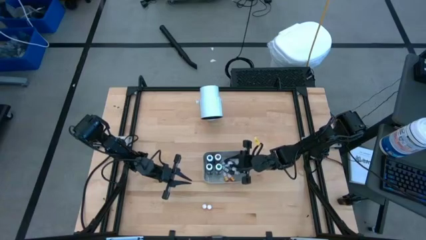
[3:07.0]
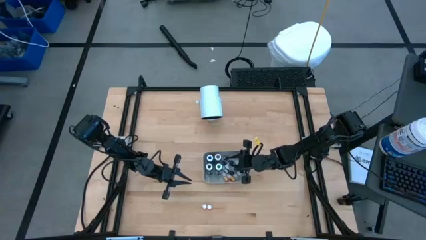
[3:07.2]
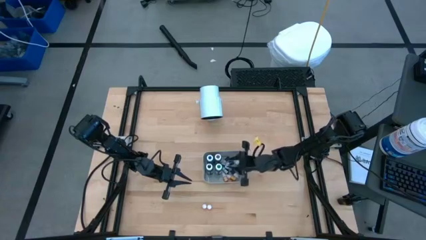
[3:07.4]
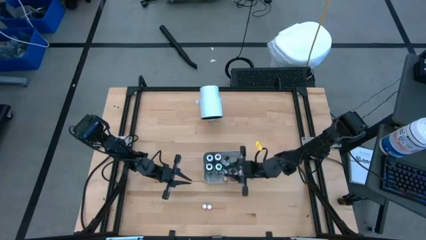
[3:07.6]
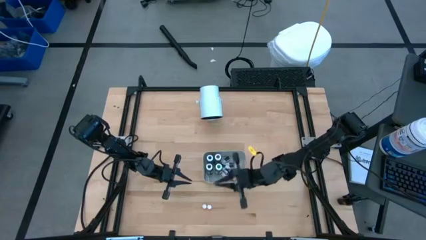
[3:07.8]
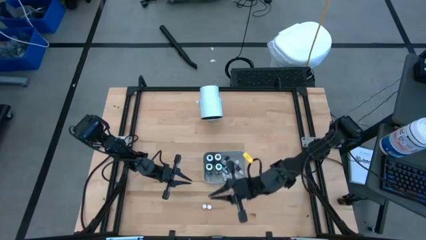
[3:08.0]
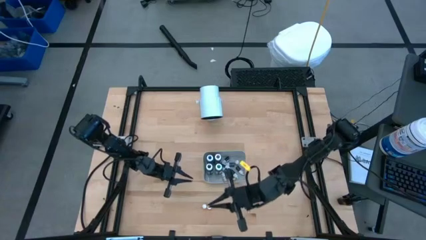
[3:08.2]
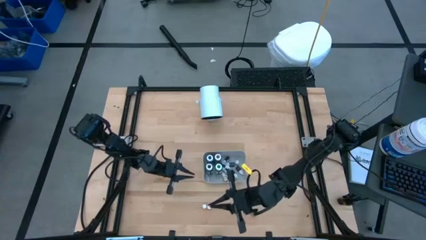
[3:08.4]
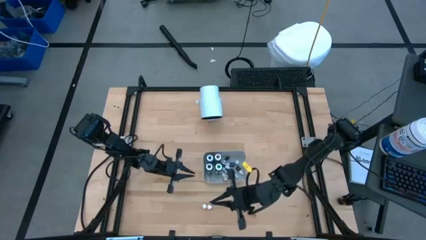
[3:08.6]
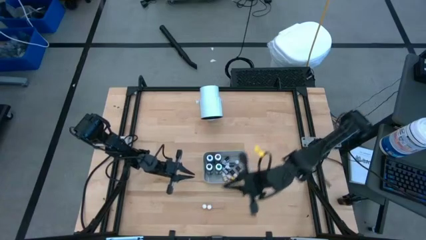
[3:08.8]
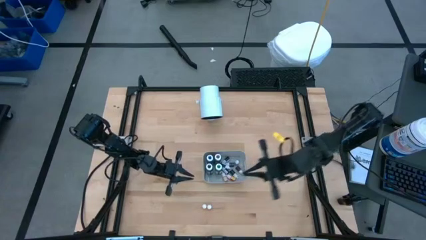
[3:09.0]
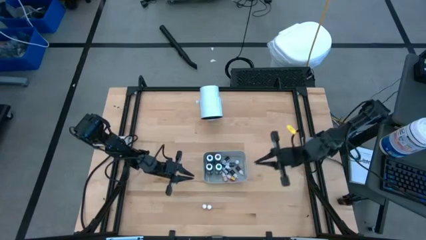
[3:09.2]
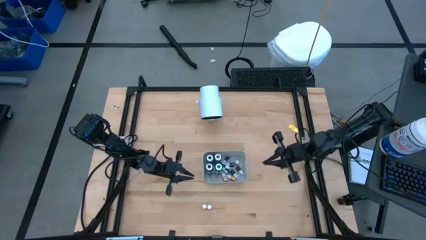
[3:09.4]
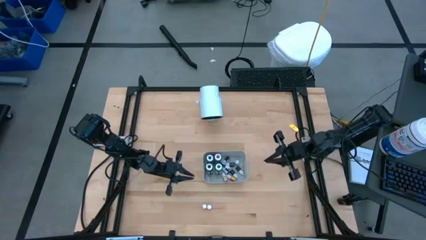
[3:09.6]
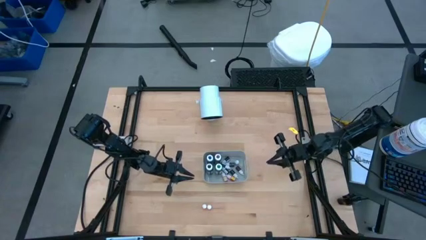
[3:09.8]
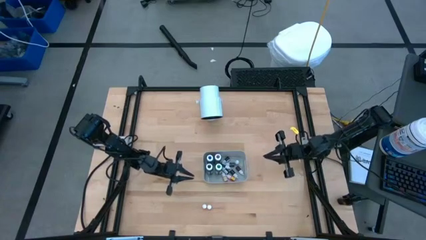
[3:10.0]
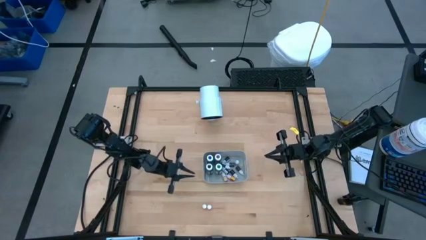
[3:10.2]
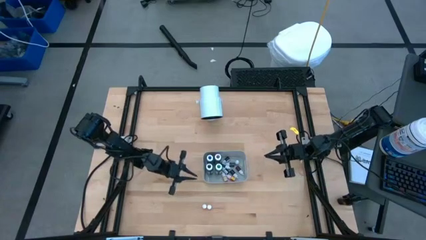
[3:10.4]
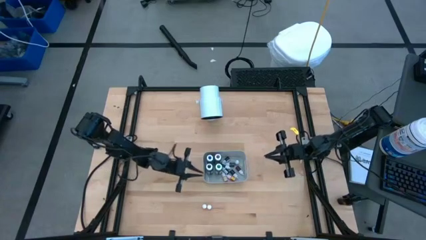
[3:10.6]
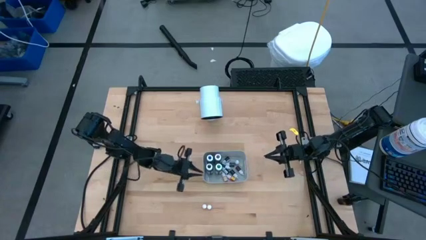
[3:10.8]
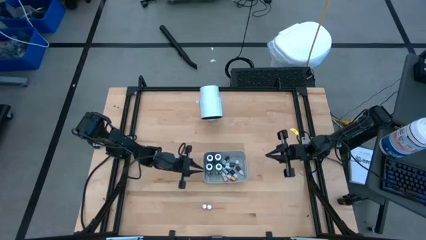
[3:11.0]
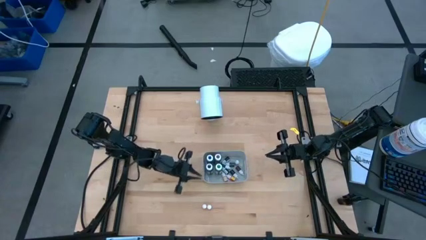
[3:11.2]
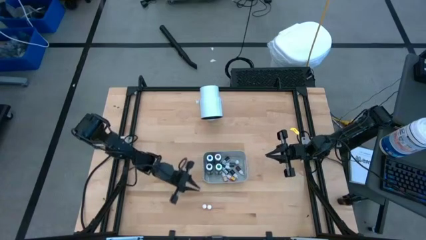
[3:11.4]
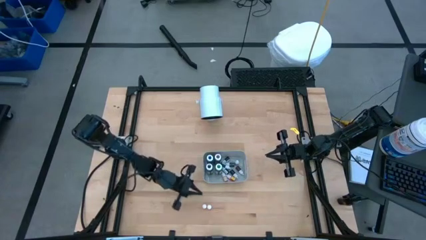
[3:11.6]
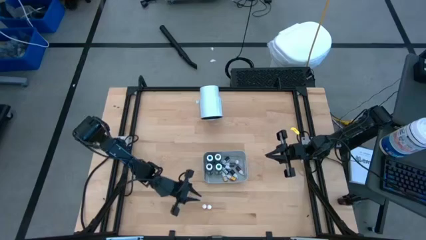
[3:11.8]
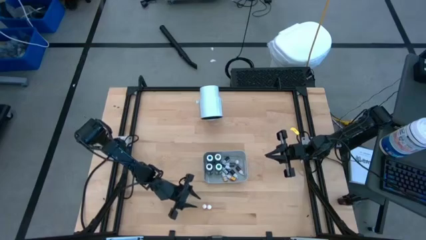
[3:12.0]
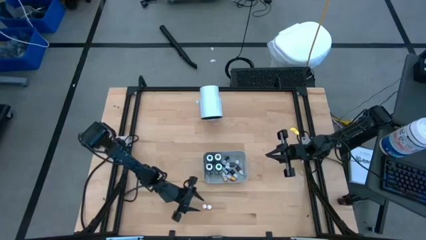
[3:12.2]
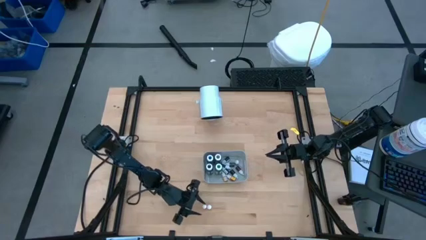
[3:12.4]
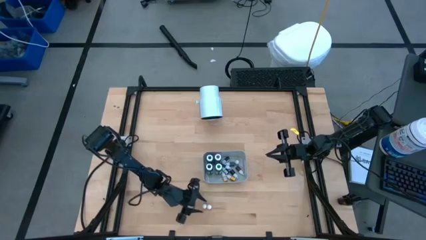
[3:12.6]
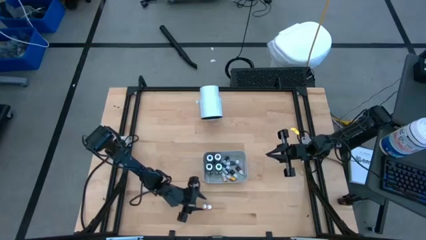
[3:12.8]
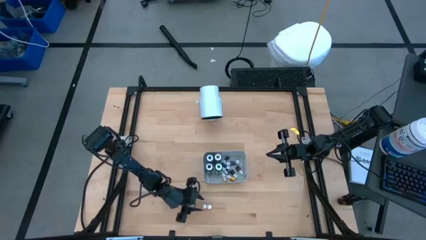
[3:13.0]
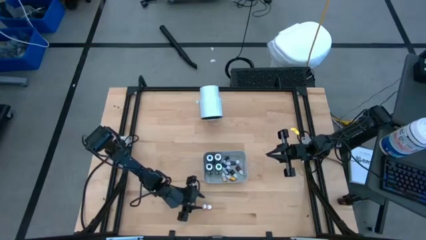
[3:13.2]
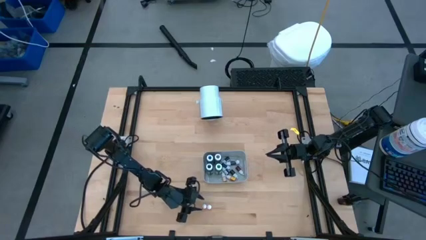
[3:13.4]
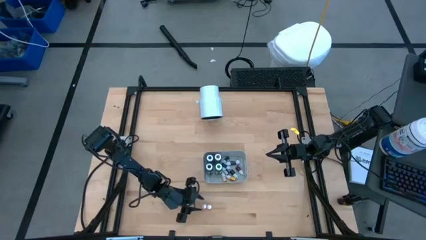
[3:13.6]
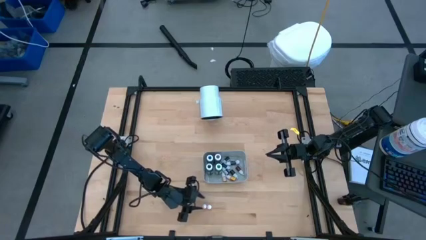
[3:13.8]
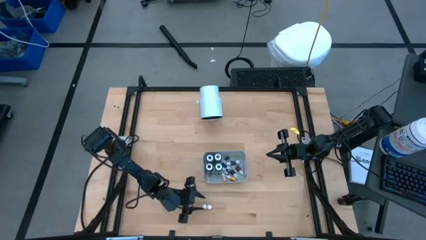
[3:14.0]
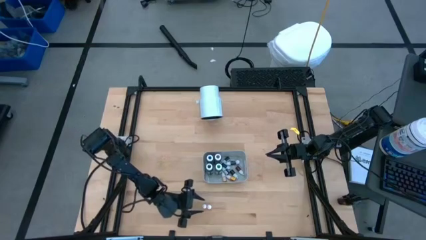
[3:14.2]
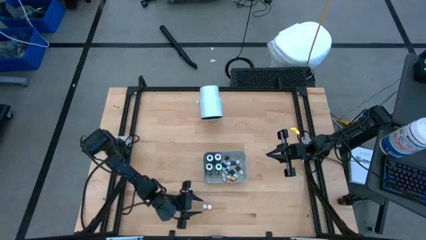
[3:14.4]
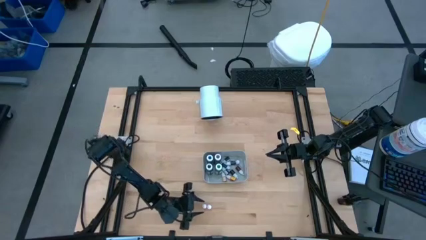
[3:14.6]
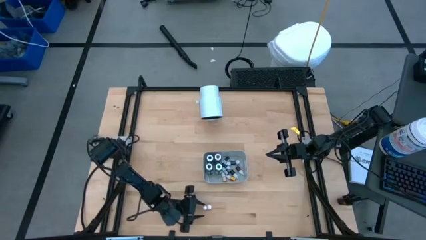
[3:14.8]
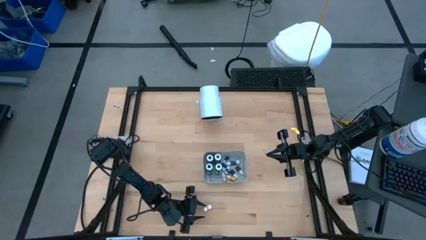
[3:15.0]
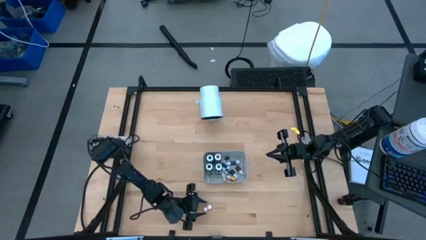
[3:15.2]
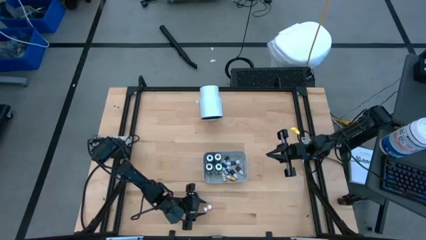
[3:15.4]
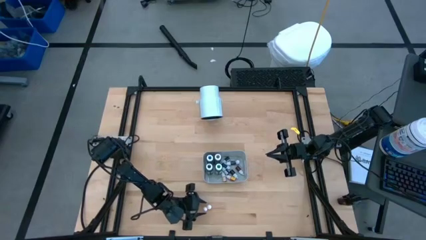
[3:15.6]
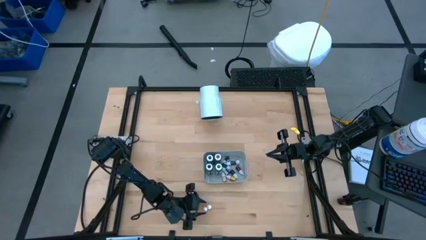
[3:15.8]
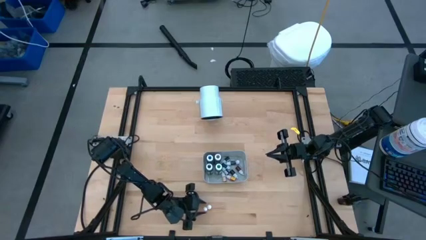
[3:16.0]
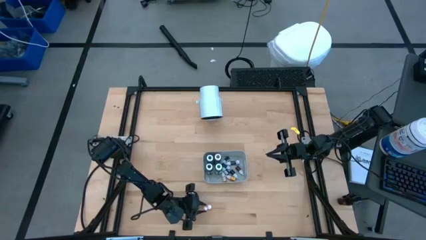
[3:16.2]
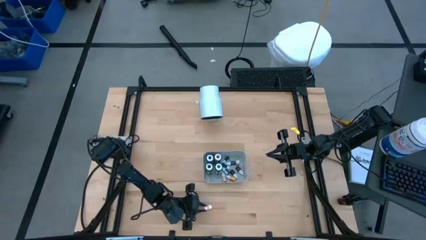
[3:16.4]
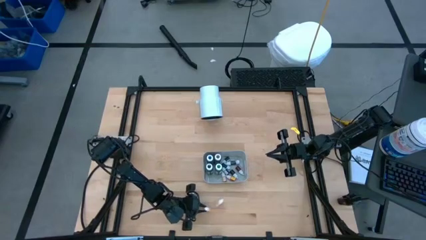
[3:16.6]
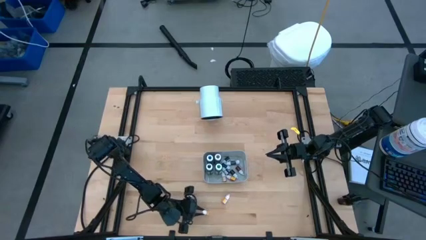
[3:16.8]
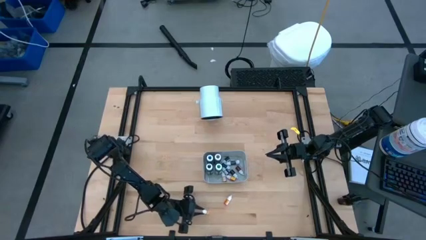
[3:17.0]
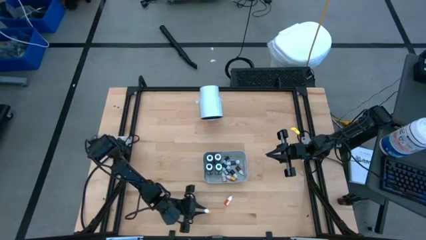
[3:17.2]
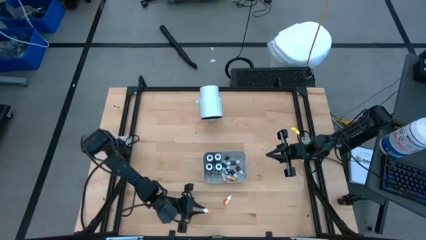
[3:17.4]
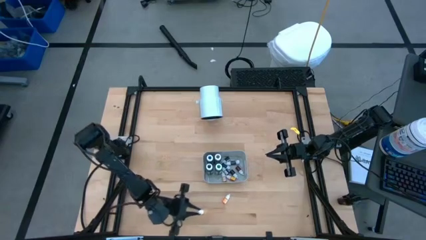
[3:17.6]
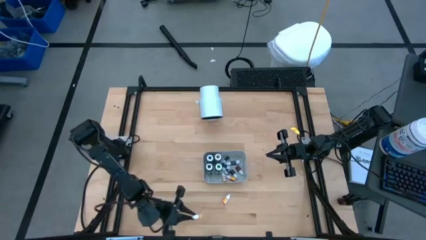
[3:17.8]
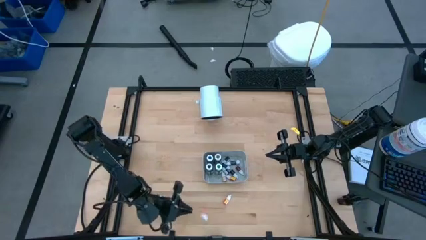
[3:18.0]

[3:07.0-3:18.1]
Task: Pick & Place food coloring
Put the orange food coloring bottle into the gray bin
